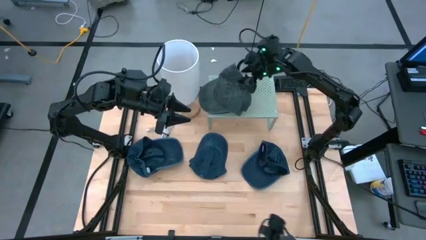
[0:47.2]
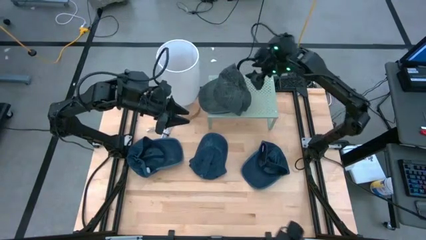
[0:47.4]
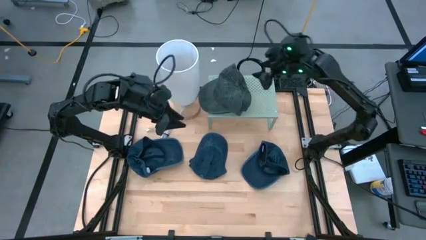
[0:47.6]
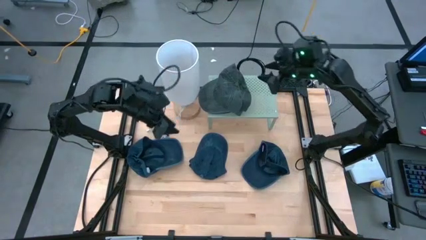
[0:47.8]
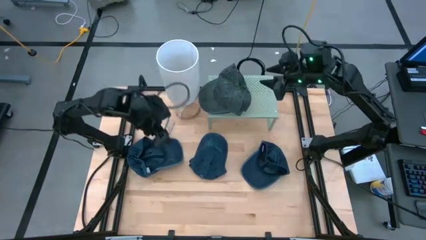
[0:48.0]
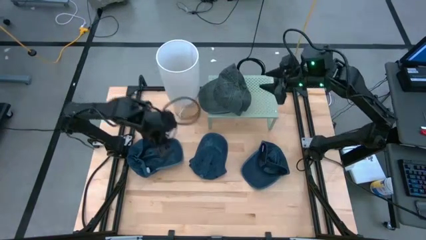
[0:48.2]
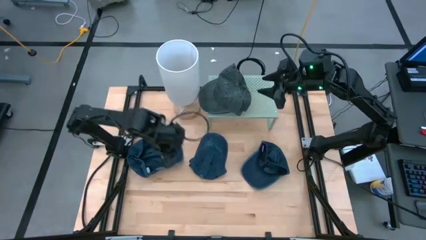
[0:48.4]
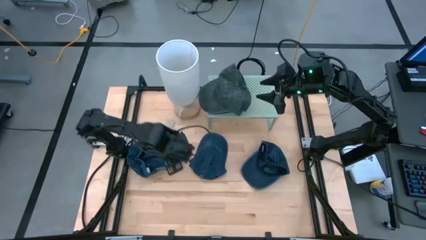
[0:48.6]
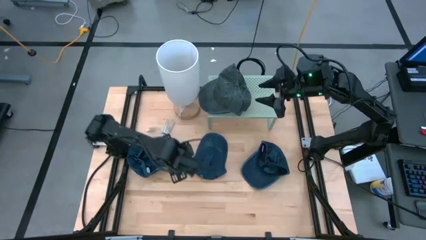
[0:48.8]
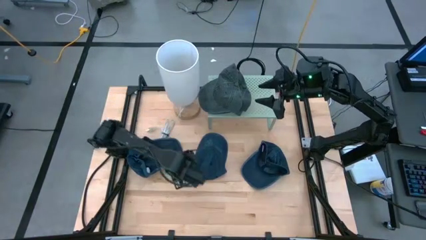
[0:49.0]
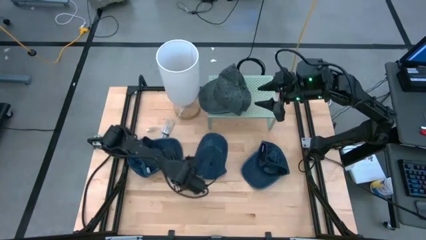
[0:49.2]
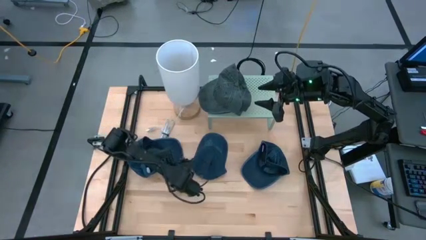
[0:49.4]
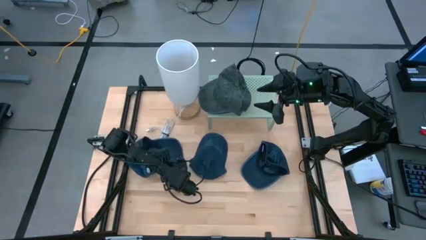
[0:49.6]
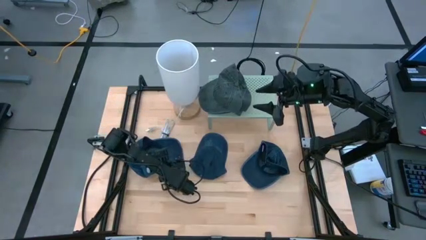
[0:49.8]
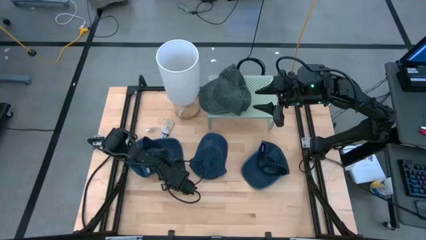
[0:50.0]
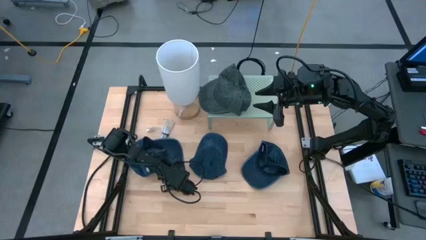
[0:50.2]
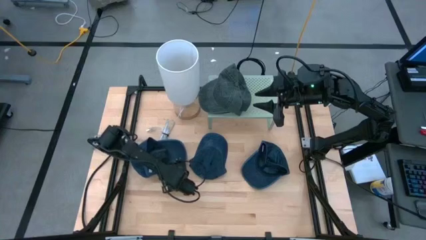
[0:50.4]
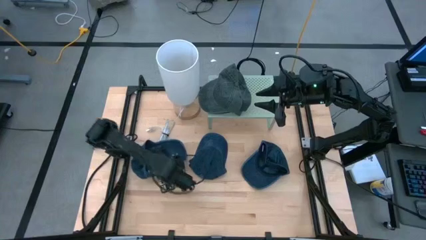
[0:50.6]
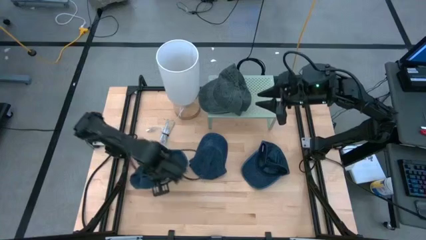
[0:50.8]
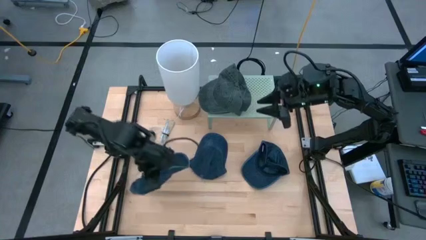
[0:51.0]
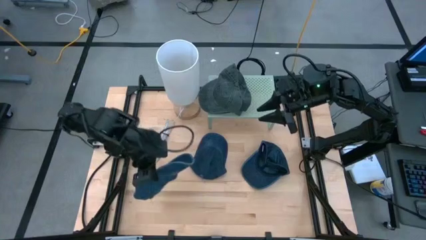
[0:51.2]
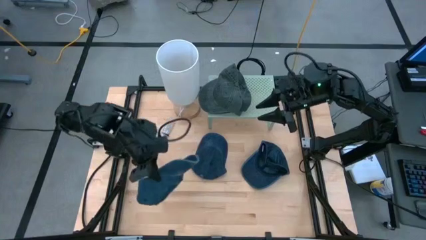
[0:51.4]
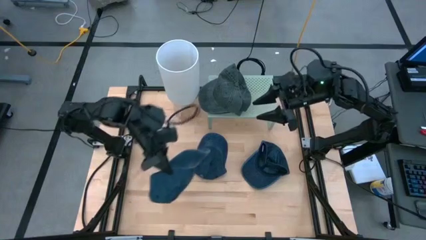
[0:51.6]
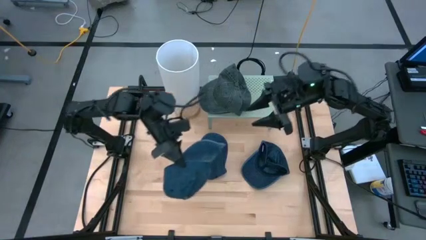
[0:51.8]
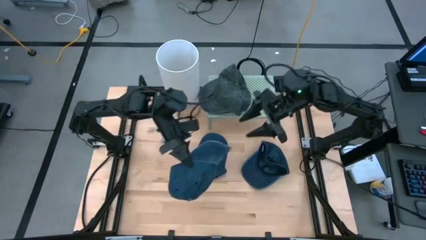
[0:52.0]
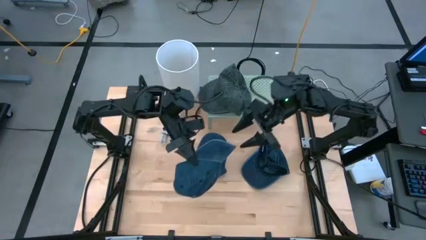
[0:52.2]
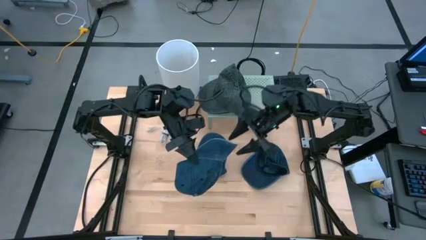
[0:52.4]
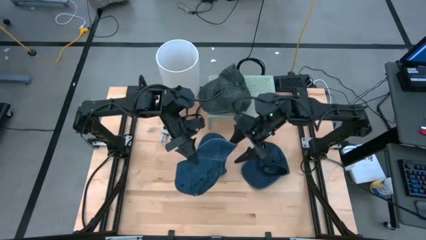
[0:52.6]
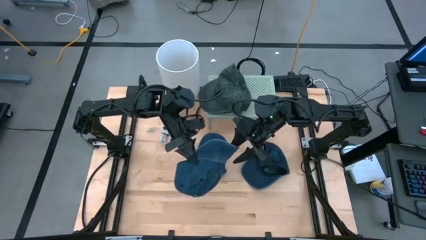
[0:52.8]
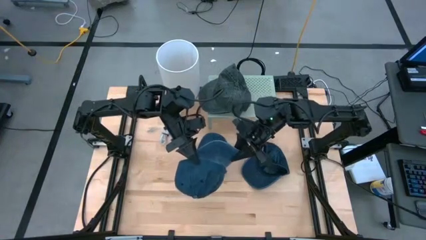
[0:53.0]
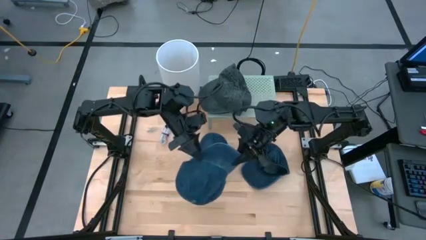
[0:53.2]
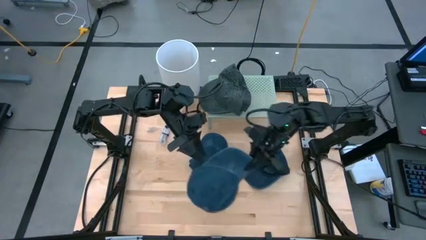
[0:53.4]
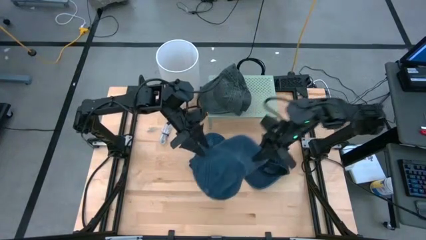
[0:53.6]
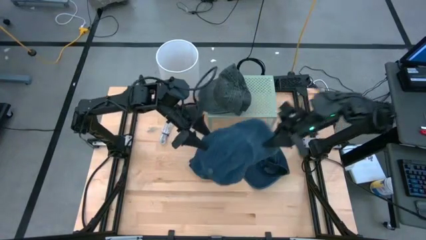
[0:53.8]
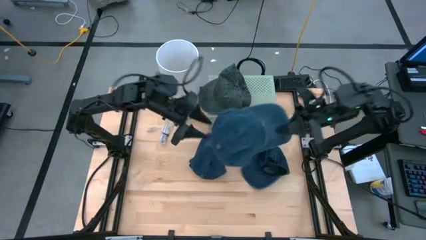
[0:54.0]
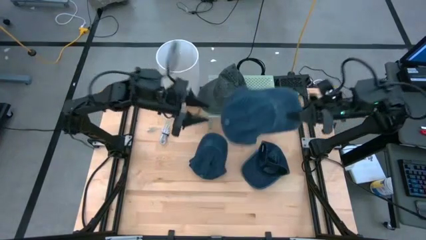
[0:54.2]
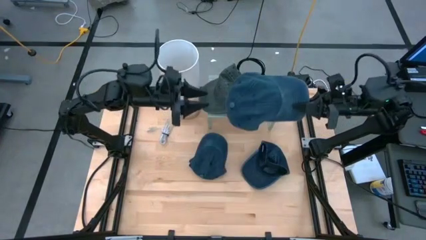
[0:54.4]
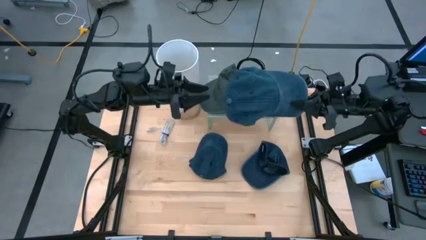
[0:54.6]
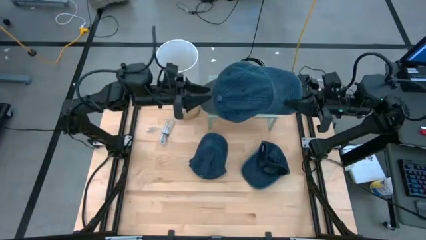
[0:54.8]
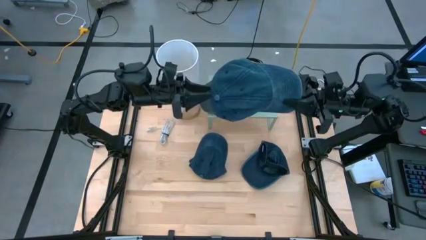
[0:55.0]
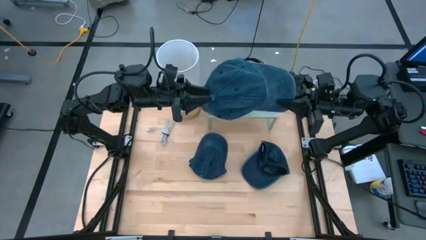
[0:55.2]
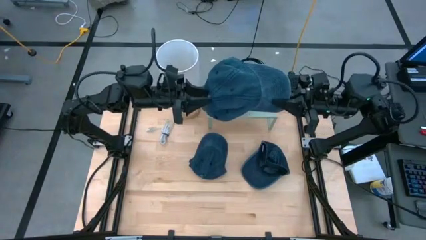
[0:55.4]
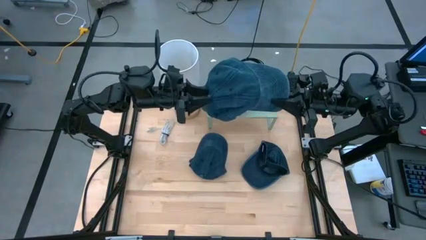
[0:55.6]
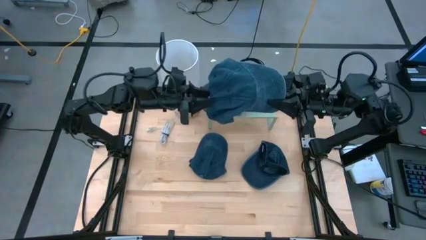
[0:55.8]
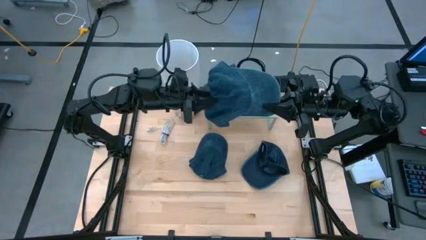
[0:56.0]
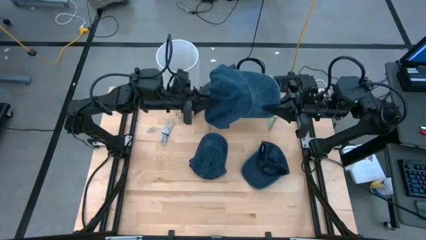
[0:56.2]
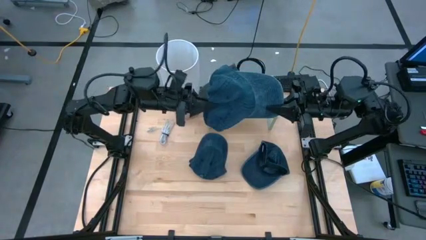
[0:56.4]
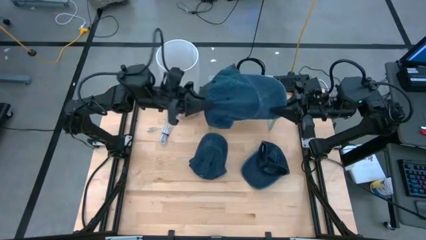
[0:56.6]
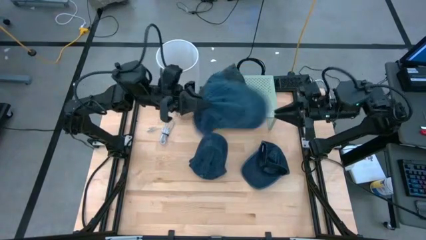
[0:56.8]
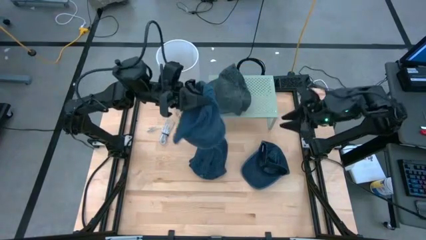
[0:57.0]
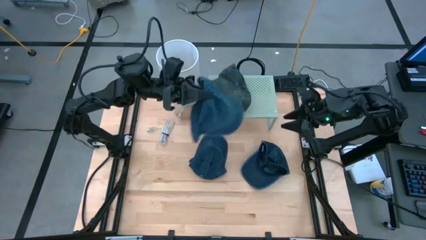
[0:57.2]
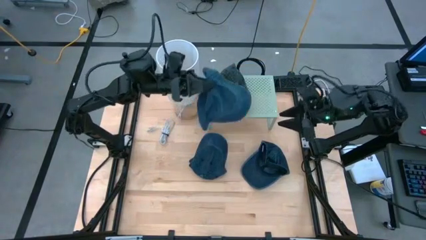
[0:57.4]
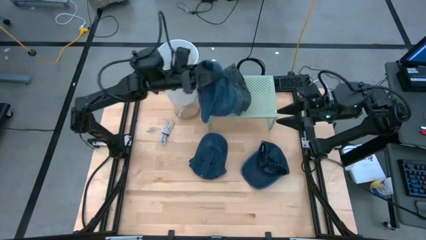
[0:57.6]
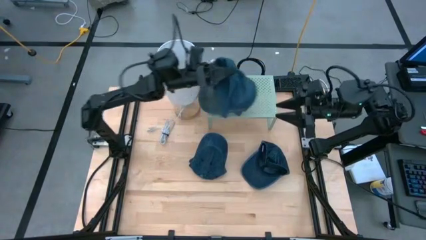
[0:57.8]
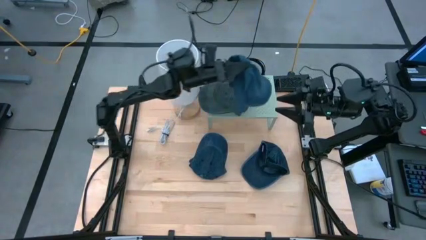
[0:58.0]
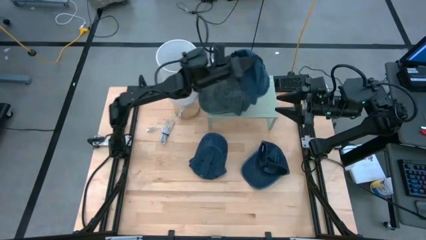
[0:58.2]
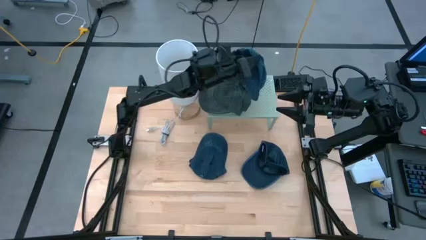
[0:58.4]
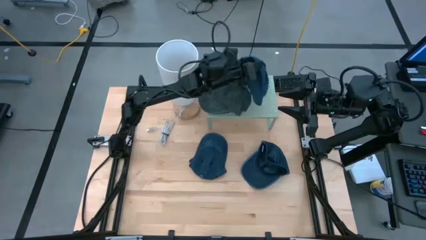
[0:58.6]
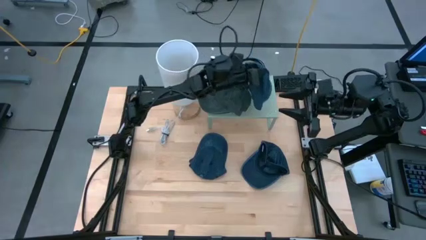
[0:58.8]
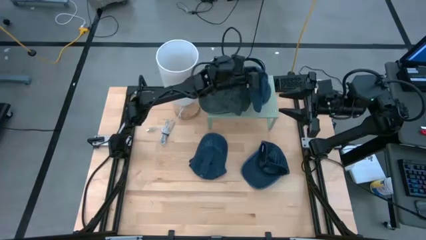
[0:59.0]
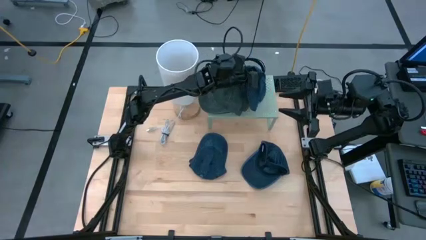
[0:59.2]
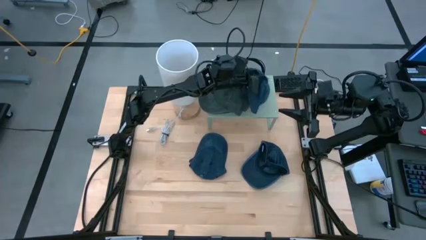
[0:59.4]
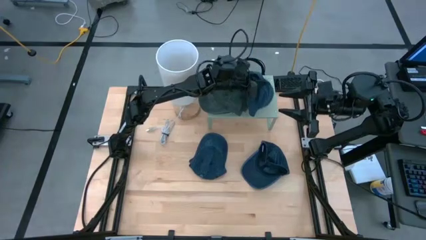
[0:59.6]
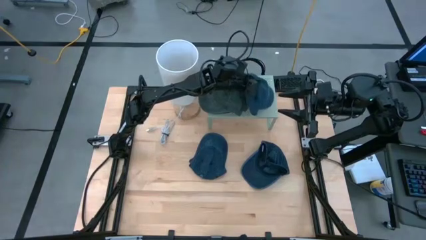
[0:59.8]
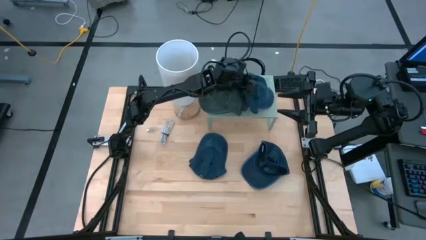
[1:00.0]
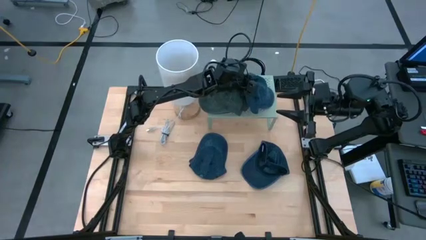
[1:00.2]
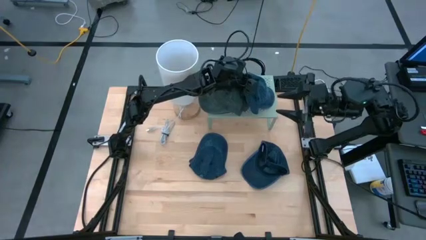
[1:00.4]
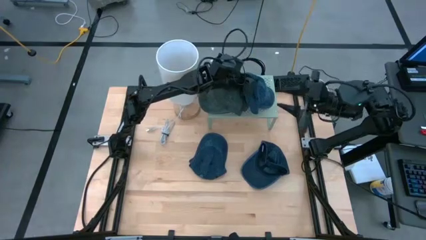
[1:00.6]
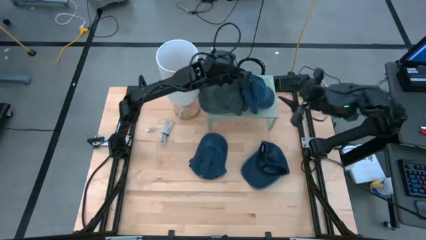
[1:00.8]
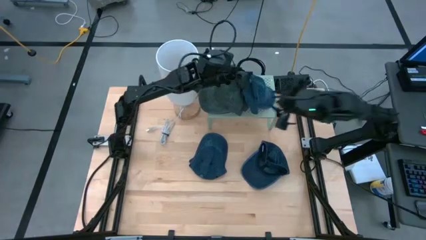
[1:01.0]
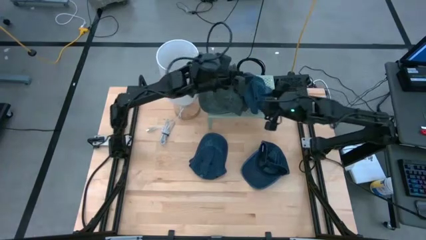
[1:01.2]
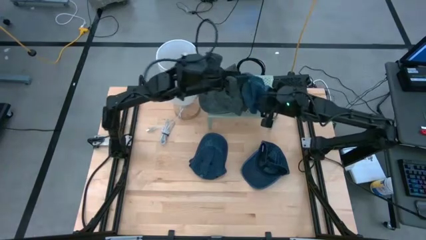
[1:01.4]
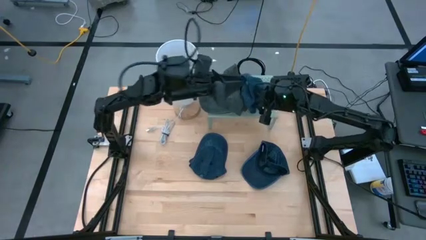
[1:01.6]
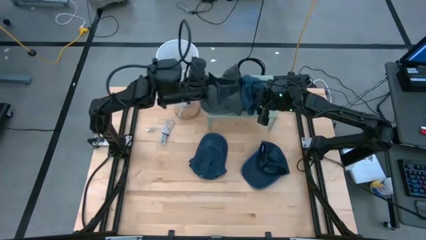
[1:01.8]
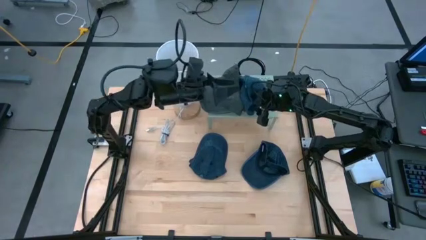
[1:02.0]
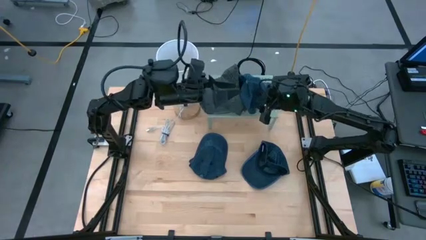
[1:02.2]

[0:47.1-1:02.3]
Task: Pick & Place hat
Put the left blue cap on the shelf
